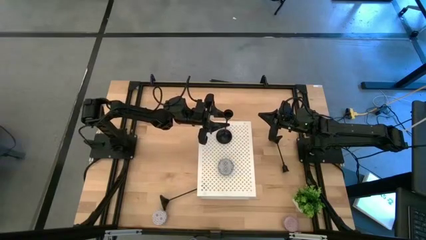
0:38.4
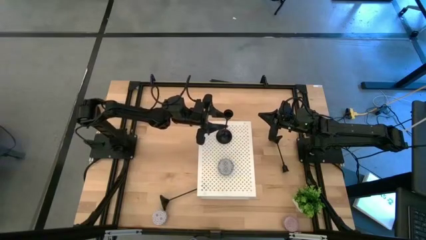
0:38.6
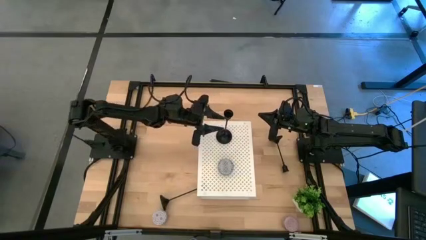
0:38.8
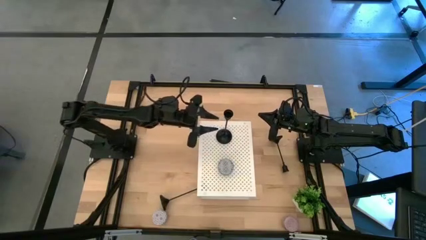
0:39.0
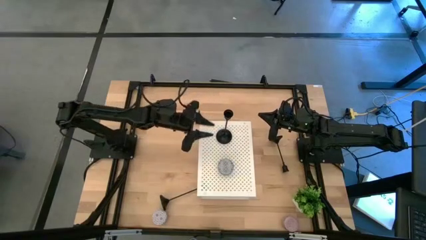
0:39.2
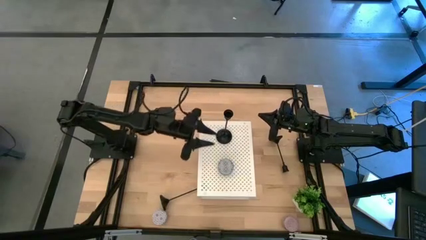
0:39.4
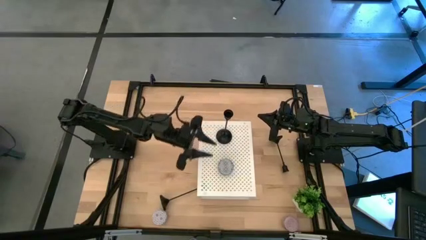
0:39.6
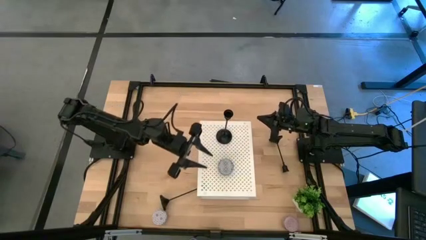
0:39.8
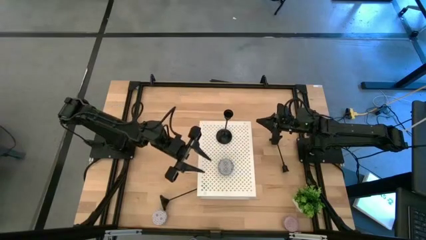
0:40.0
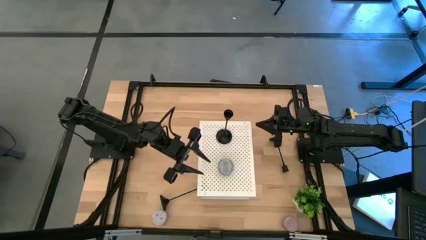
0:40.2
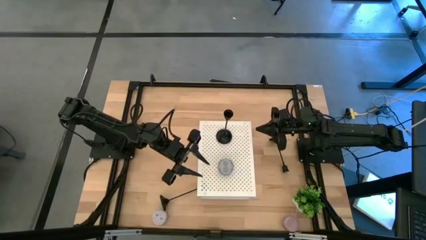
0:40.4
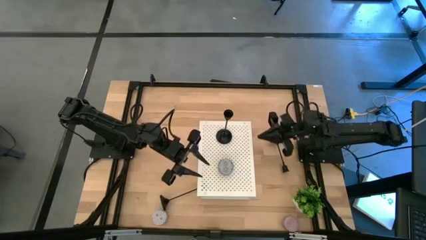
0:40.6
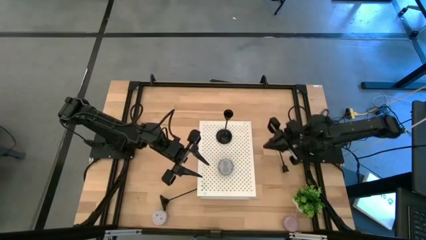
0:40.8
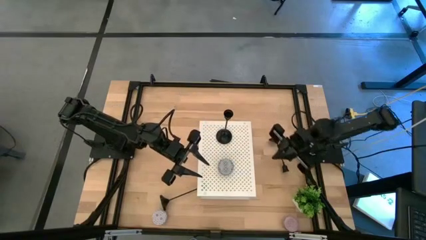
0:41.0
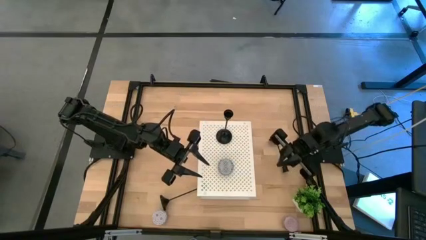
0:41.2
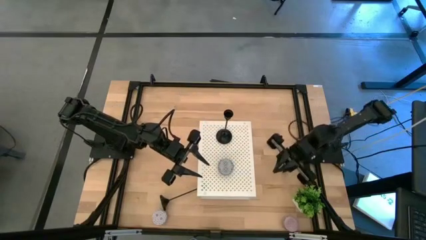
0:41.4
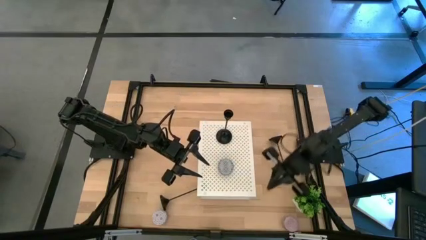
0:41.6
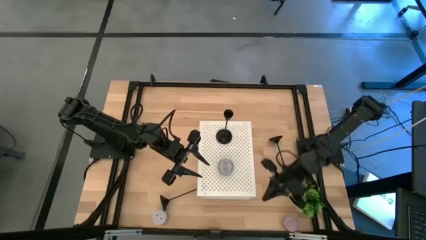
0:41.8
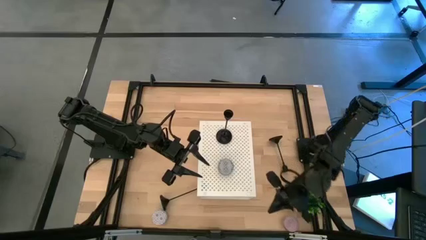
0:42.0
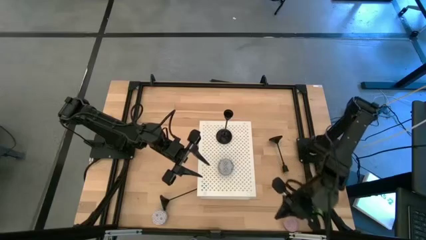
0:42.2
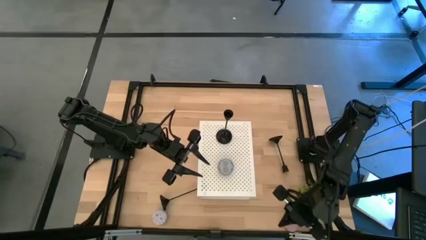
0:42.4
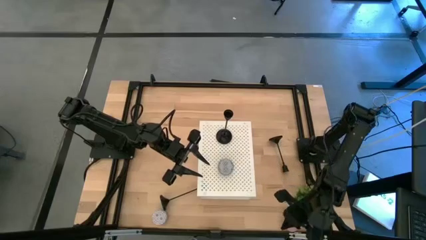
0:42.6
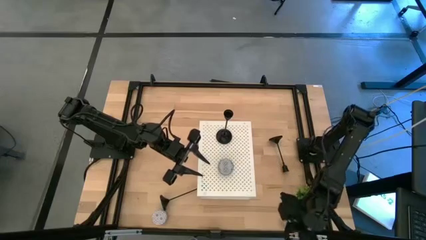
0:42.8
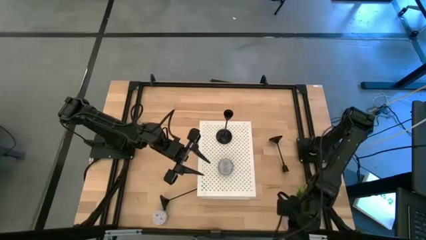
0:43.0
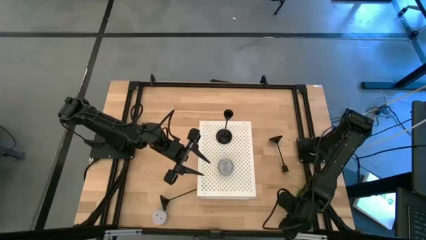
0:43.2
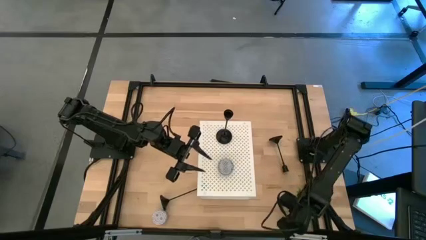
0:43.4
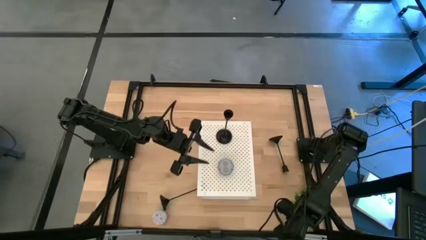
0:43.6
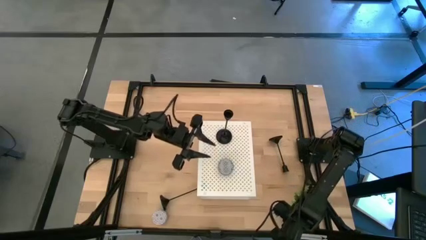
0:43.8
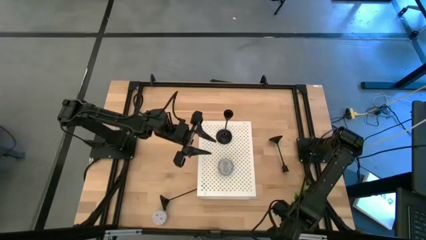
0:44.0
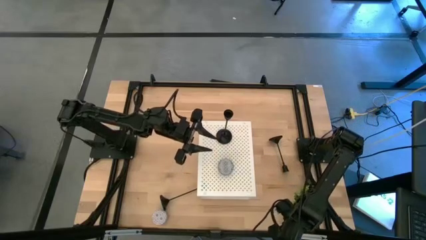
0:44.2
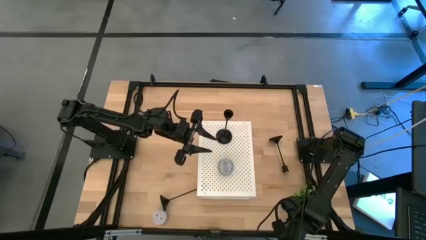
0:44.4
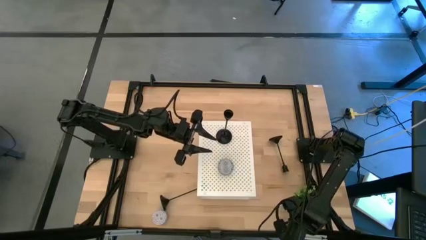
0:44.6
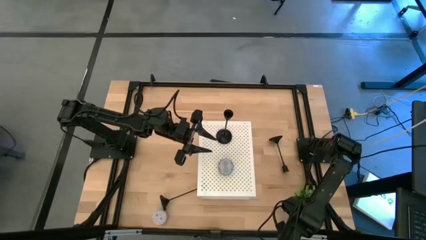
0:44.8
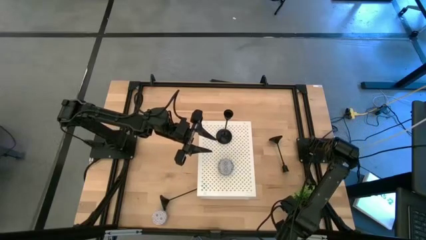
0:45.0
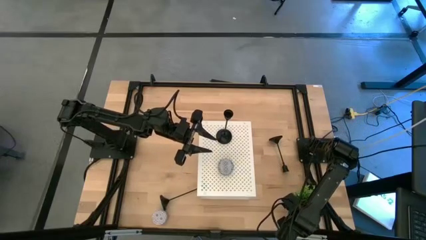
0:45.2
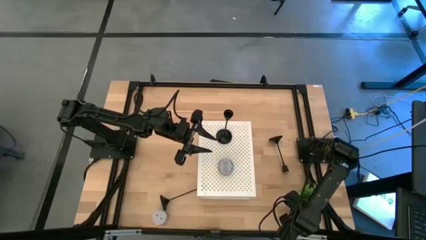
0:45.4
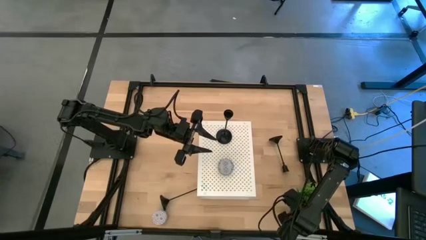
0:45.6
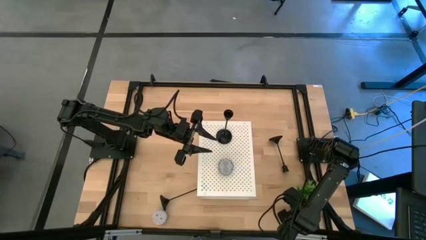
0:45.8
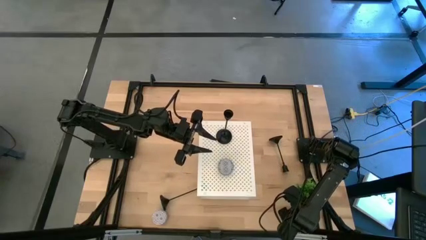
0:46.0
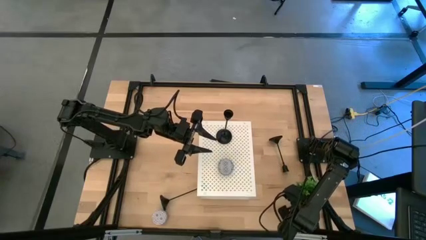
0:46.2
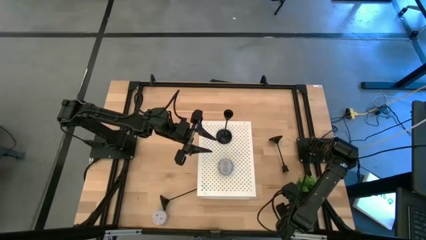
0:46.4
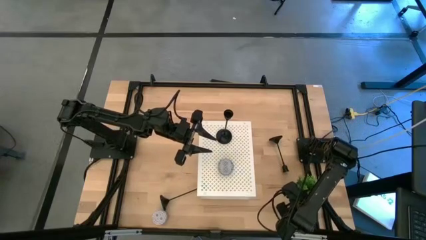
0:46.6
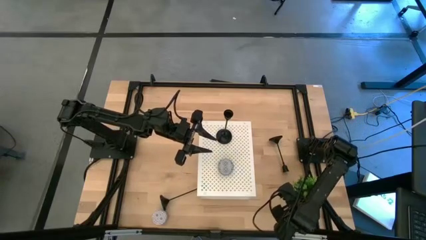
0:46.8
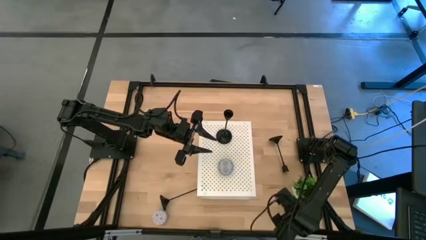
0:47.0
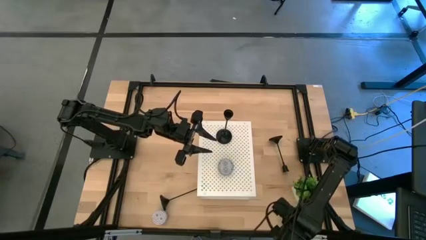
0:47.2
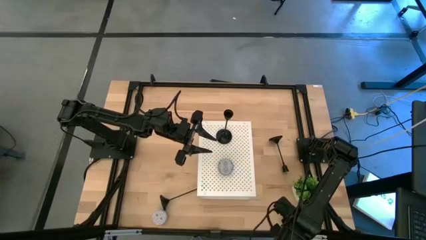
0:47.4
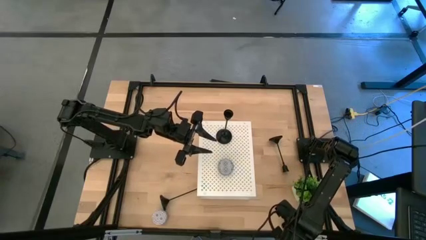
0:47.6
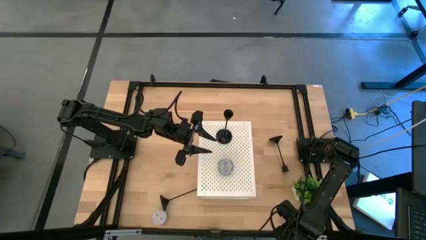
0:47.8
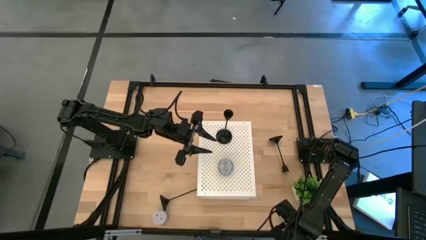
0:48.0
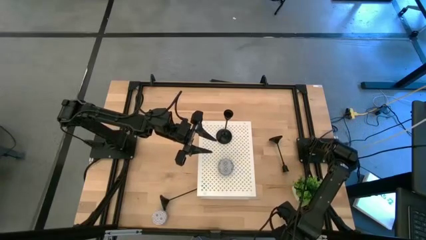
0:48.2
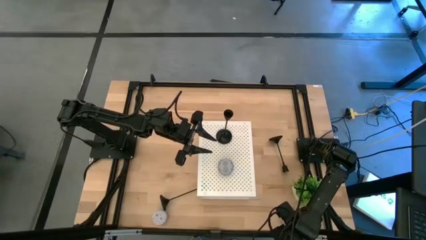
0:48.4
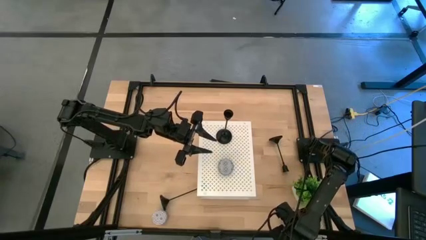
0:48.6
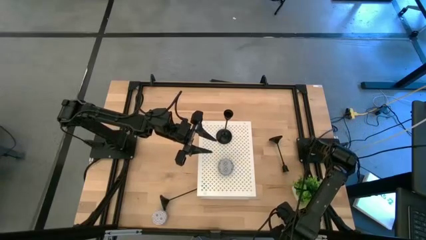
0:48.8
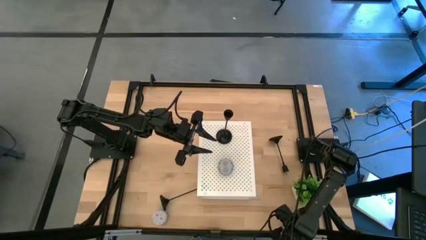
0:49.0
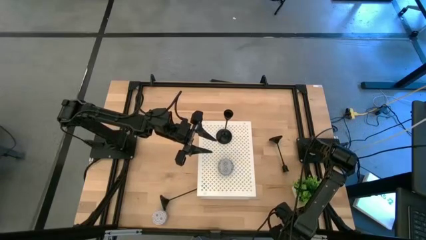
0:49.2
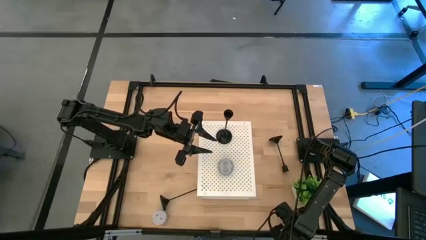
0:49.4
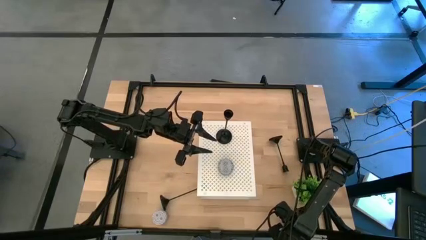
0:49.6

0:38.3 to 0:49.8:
Task: Pick & Place candle stick holders
Put the purple scented candle on the shelf
